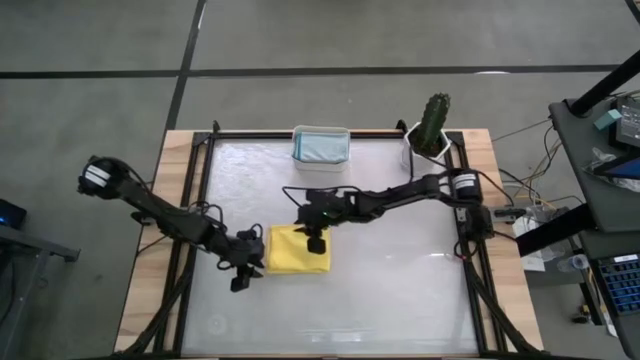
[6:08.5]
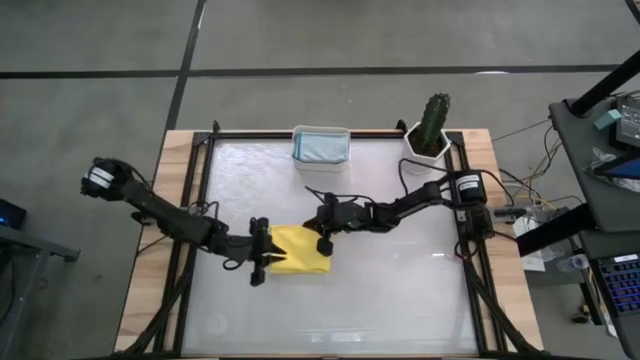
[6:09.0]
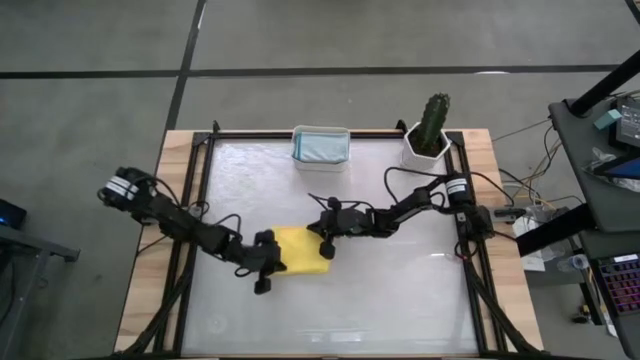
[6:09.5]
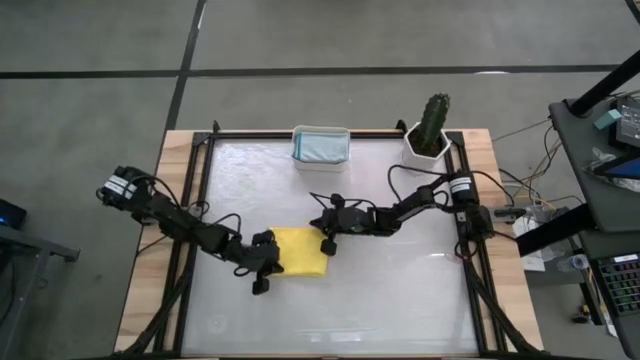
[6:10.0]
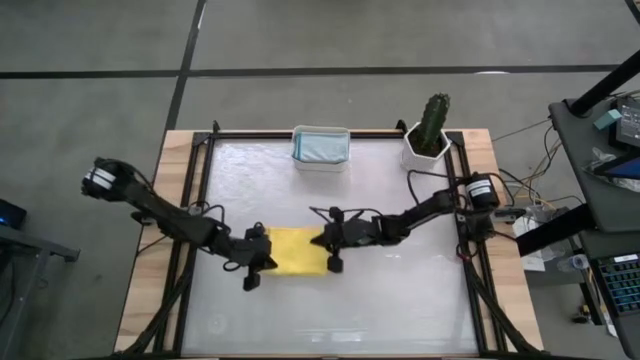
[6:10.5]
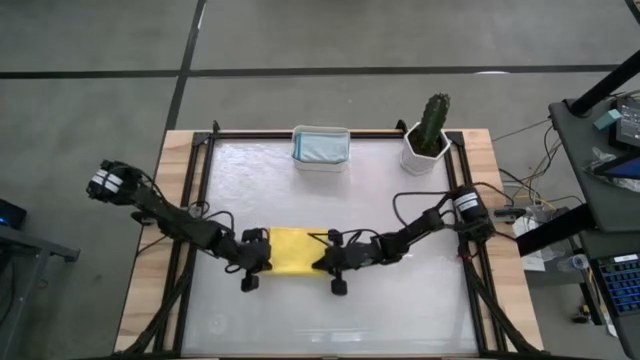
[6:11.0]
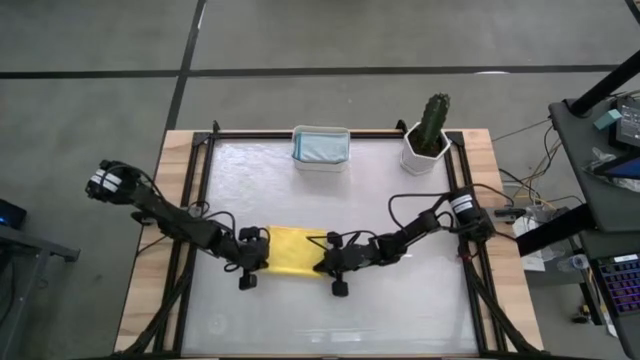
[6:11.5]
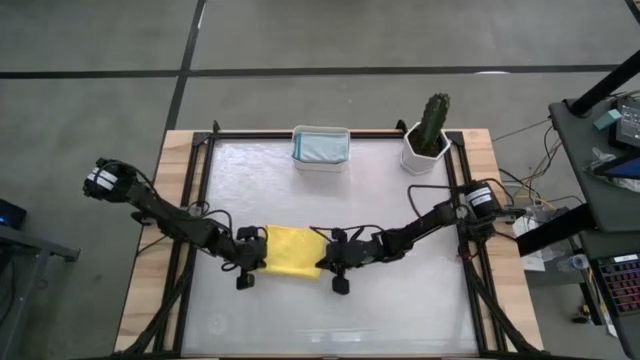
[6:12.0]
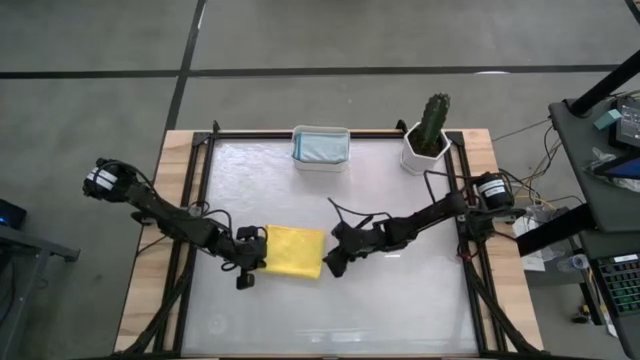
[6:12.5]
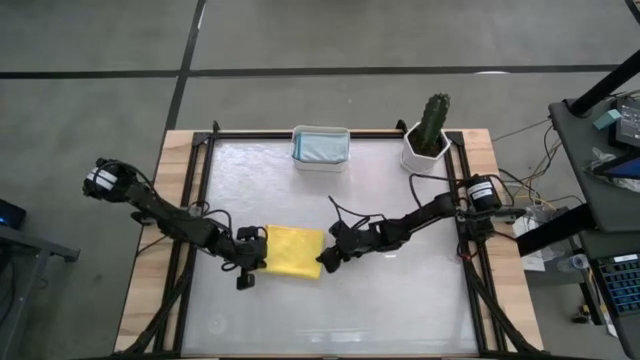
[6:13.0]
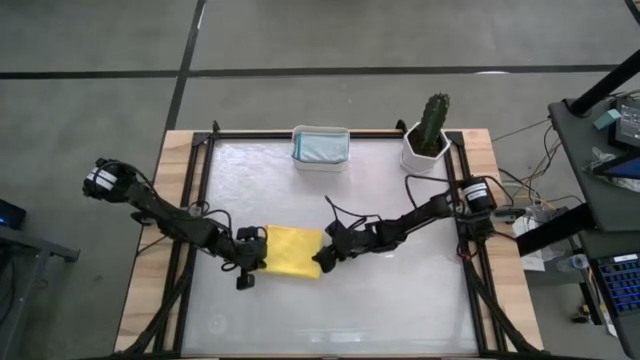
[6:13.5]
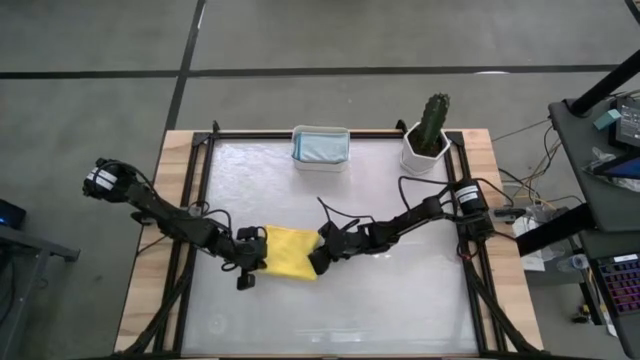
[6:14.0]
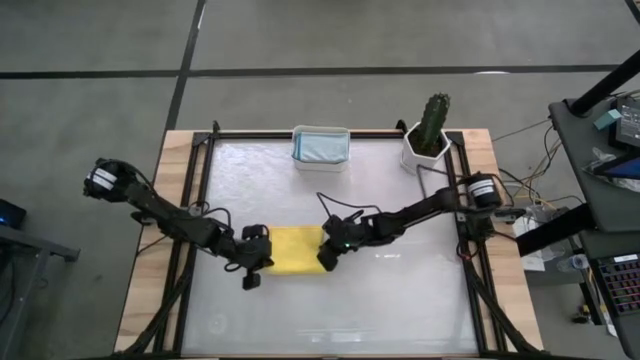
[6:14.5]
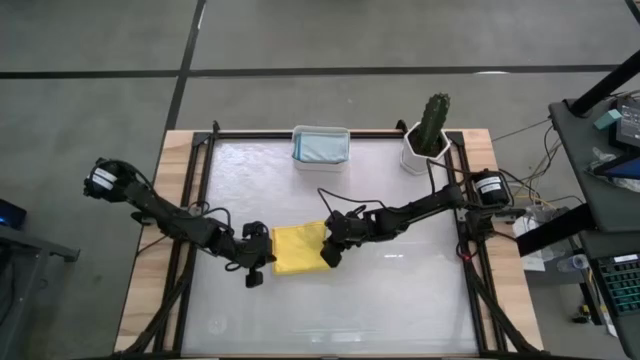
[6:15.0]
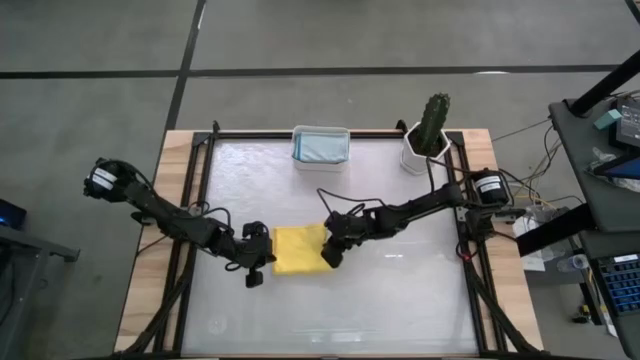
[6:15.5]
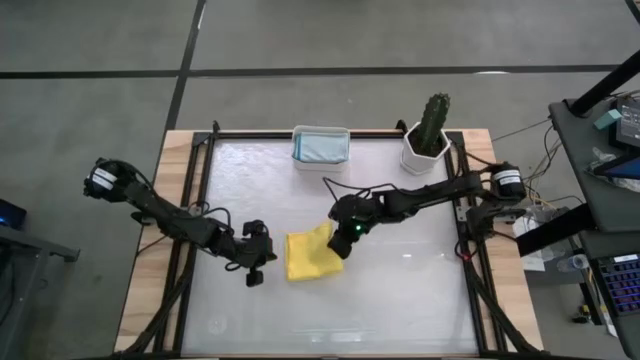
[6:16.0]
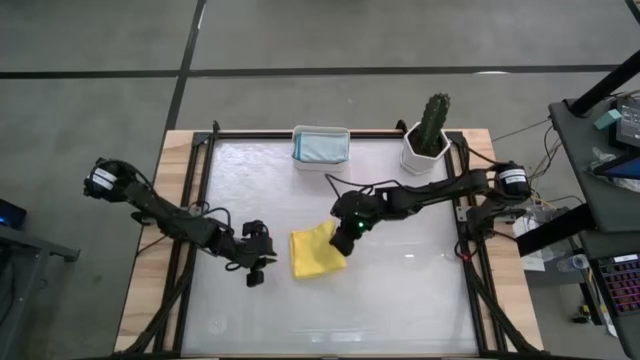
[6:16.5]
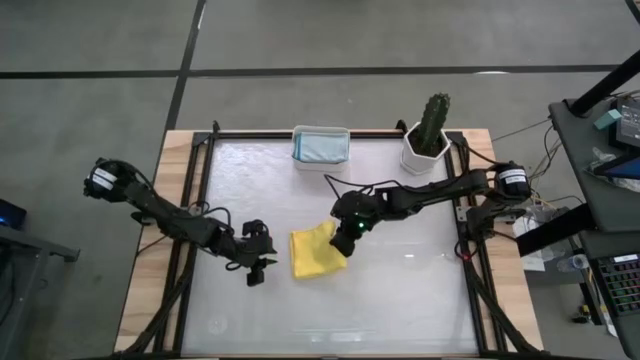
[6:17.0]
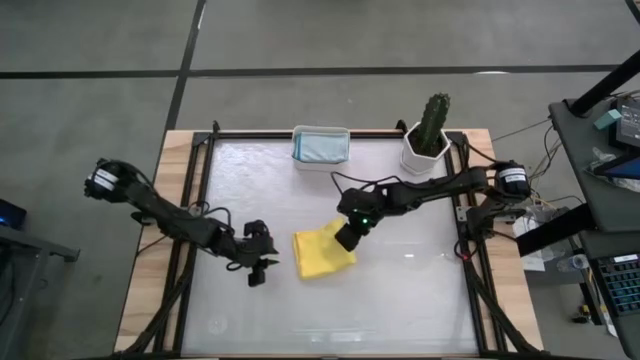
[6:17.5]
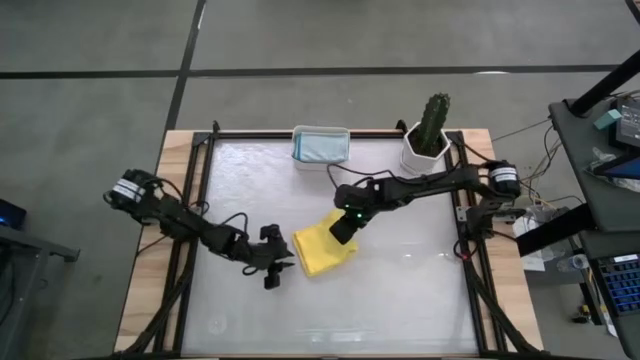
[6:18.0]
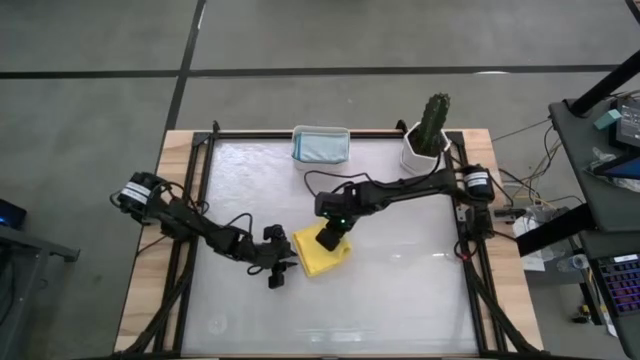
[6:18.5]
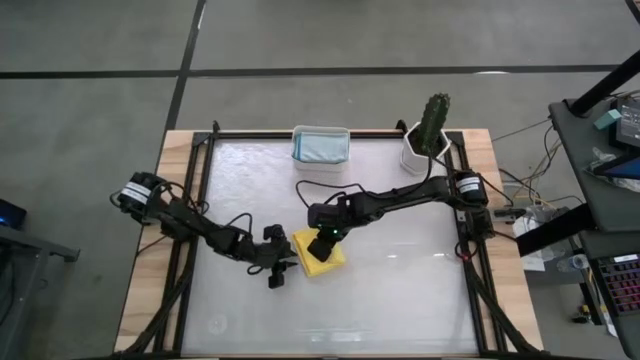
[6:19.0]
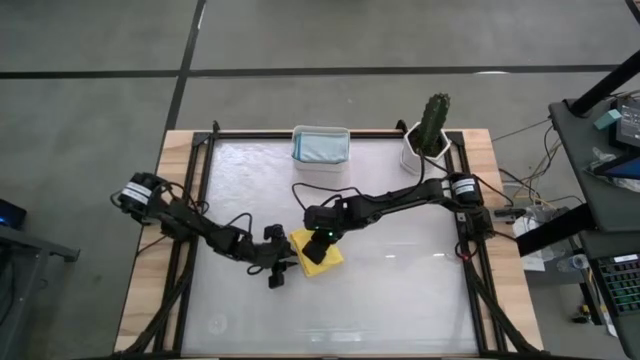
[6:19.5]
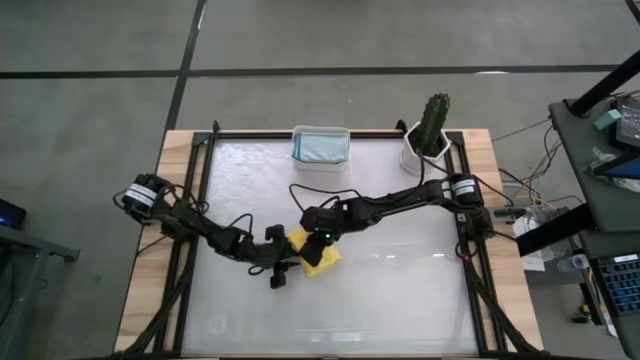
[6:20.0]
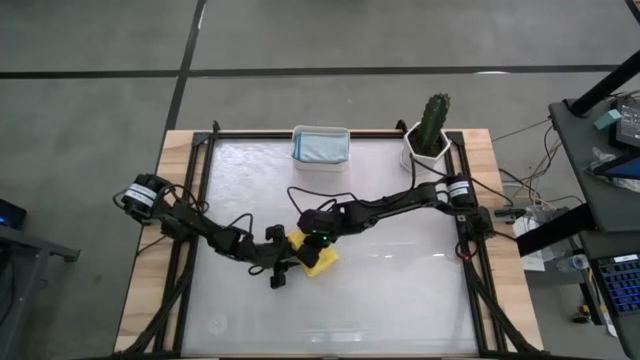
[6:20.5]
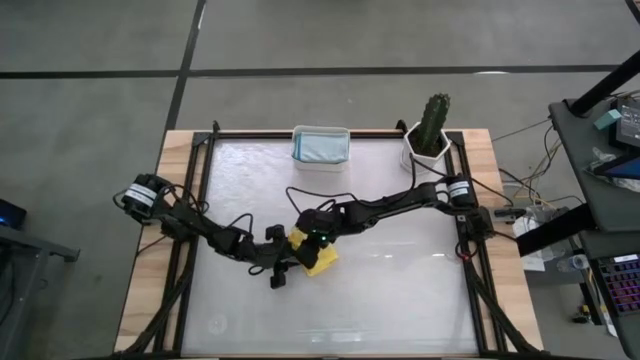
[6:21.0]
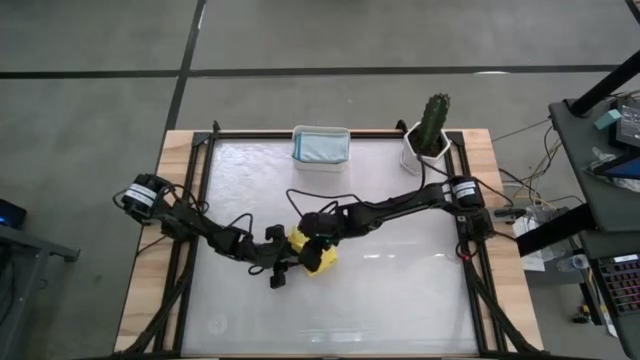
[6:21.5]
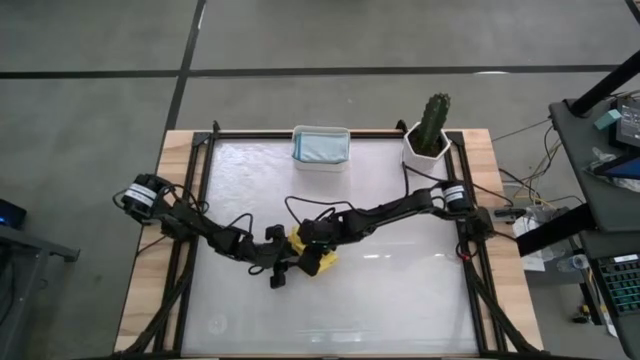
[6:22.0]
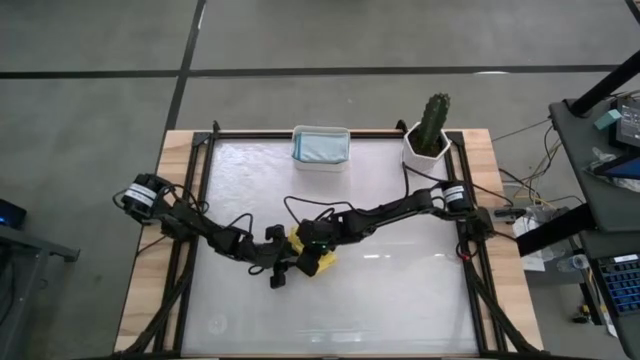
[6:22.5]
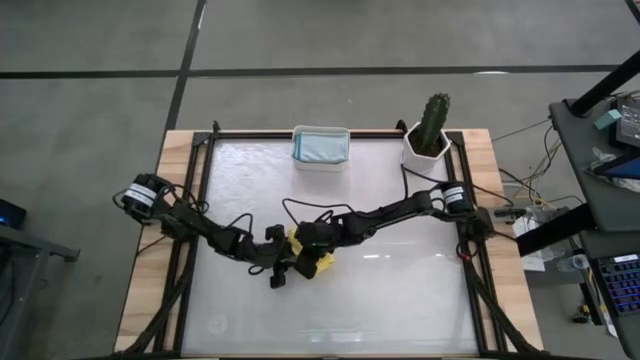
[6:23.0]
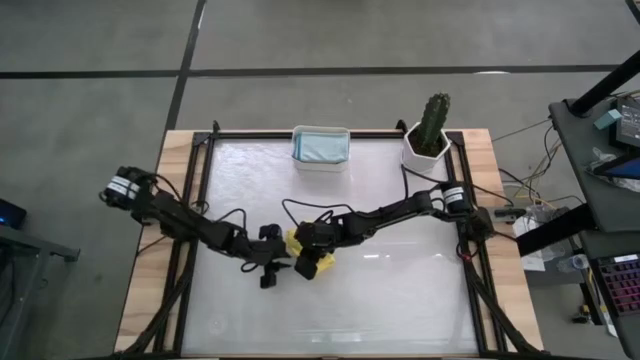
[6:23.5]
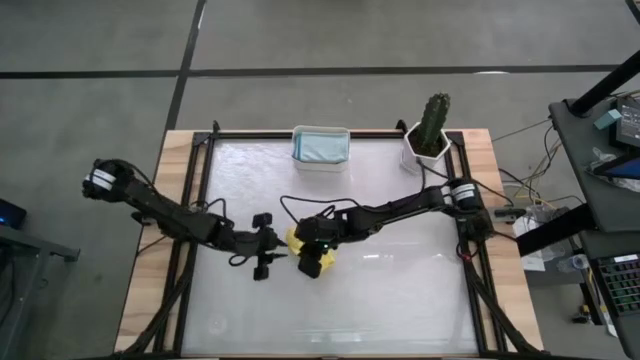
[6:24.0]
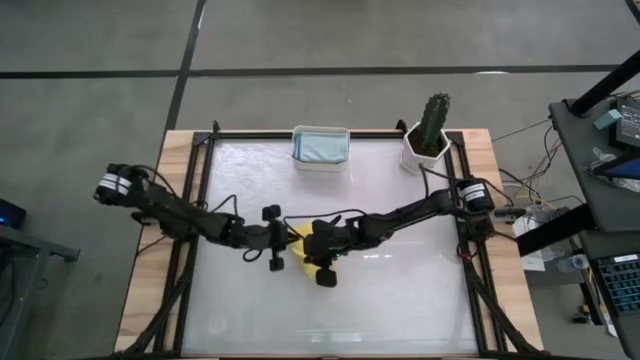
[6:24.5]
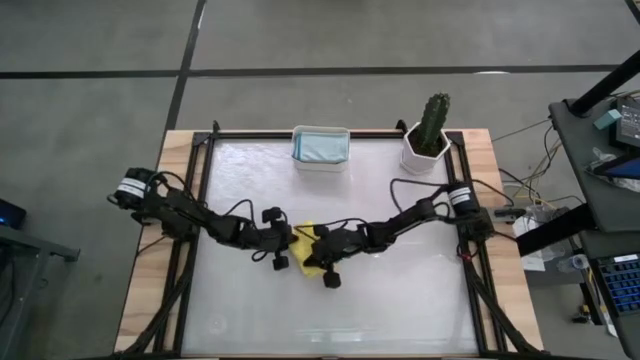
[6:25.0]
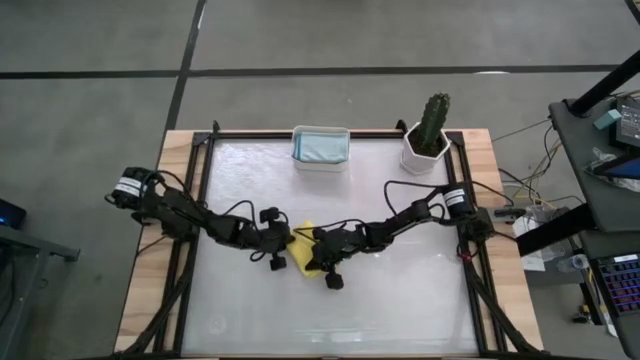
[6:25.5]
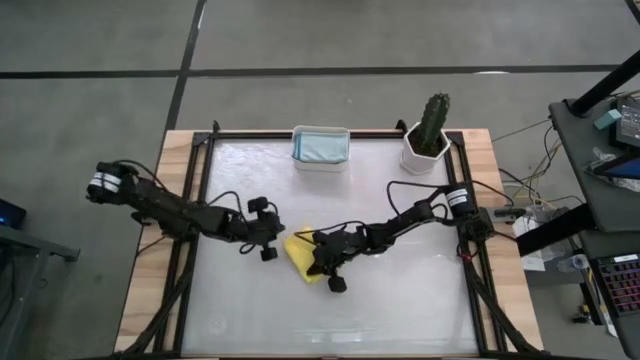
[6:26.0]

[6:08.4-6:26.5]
Task: Fold microfiber towels
Fold the yellow cloth
